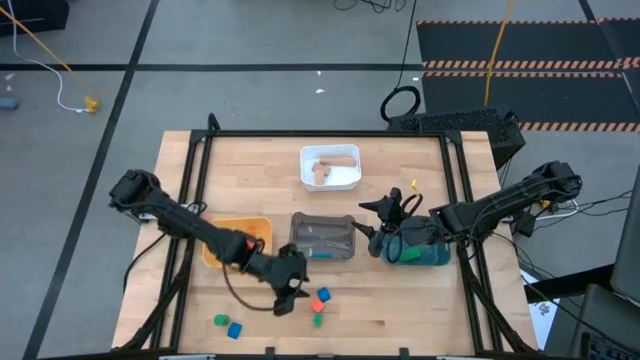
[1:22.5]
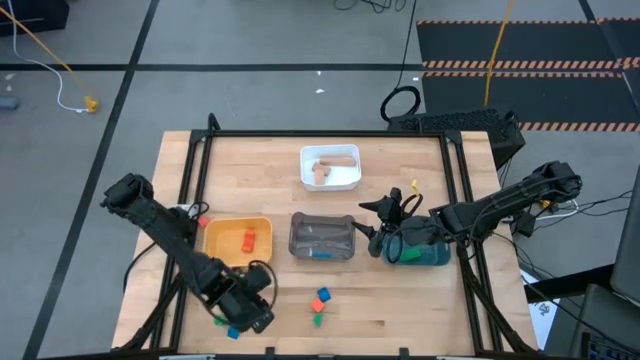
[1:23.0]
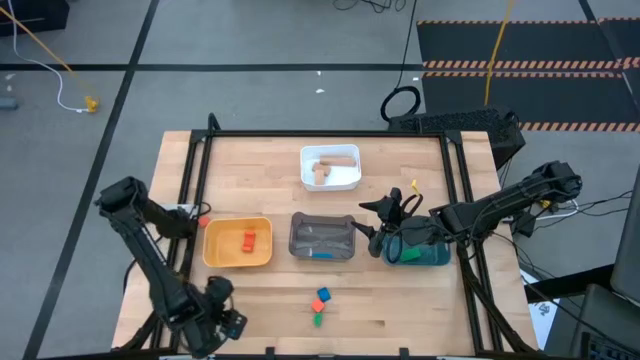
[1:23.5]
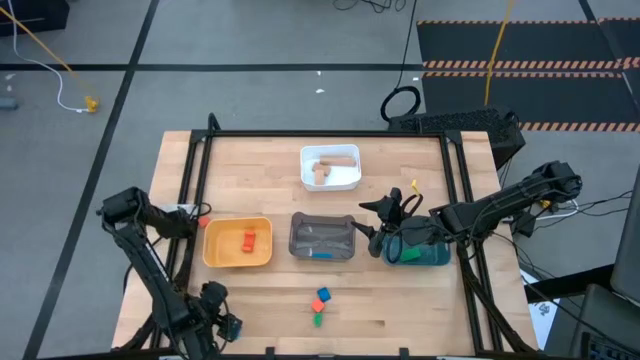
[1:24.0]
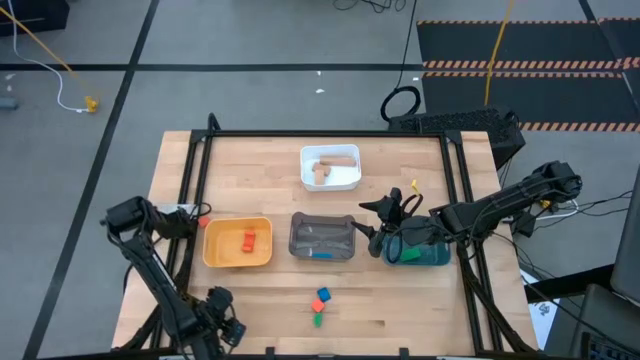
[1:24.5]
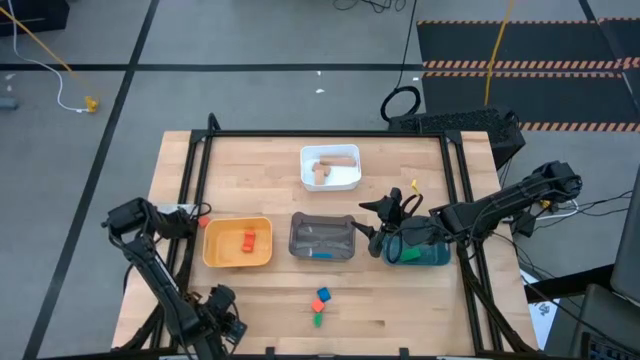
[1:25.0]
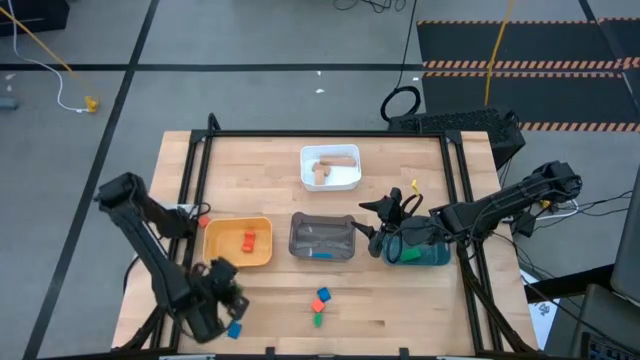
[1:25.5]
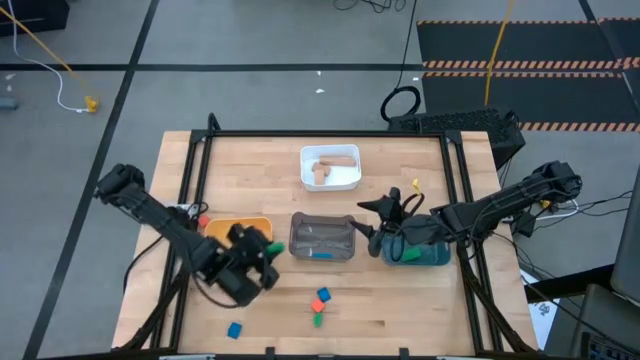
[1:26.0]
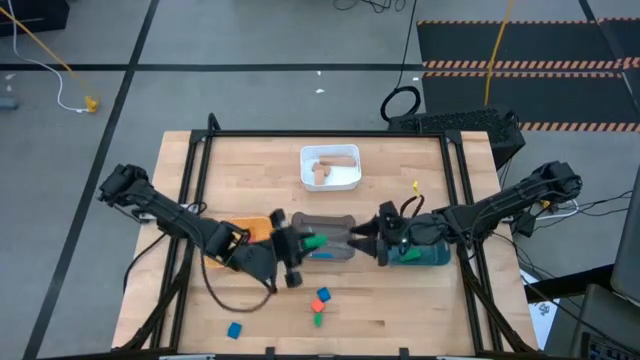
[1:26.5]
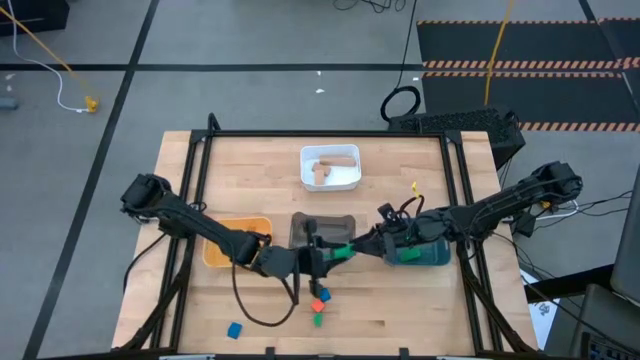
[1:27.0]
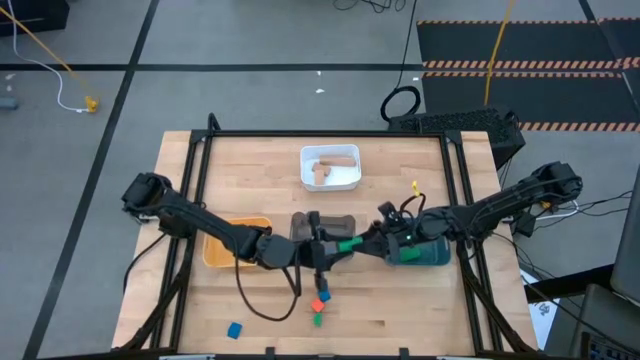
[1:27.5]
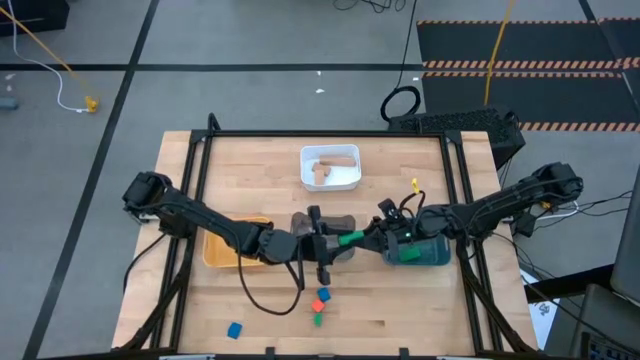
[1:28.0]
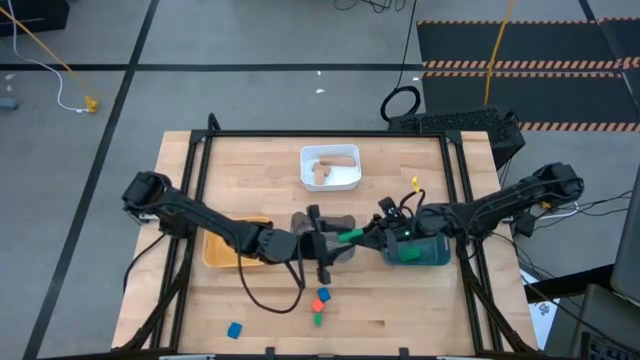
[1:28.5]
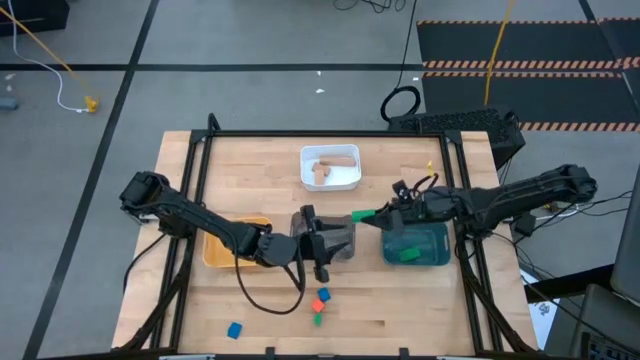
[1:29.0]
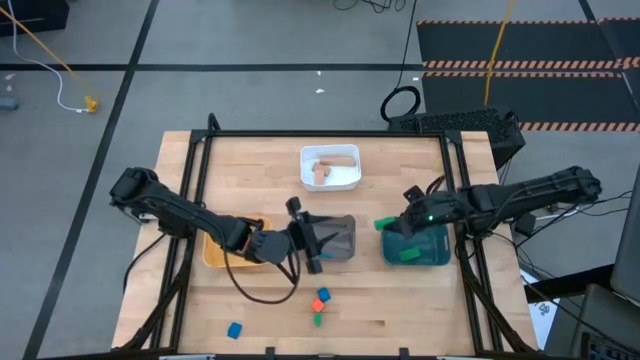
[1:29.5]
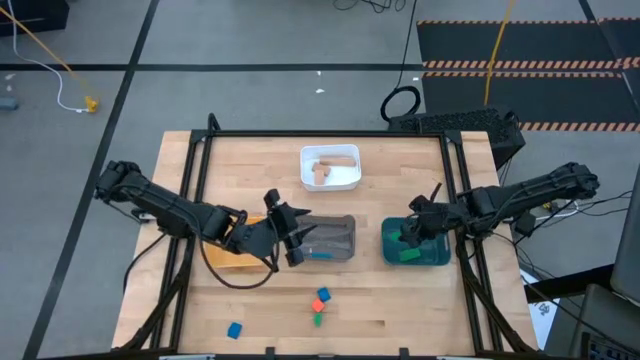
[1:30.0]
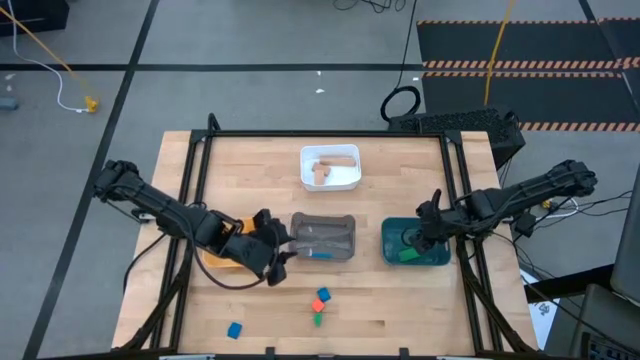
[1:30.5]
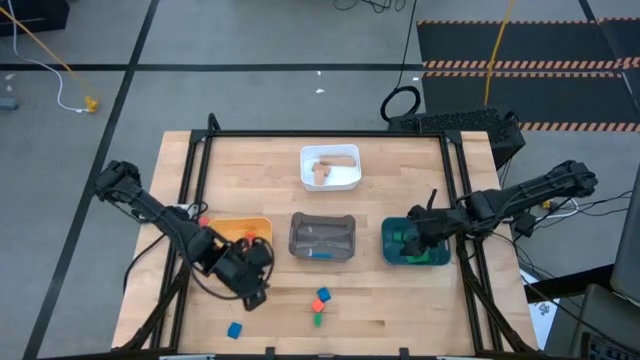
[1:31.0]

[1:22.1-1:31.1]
Task: Sort & place blocks by color
Put the left green cylindrical block into the dark blue bin

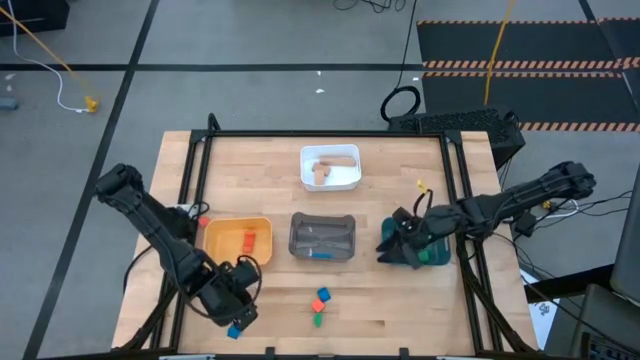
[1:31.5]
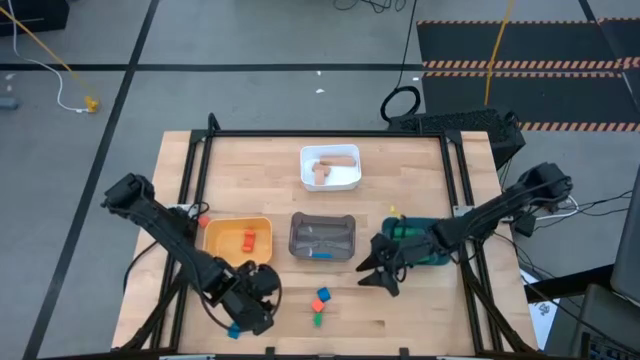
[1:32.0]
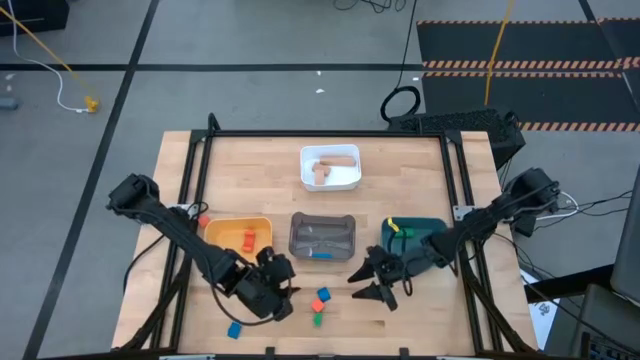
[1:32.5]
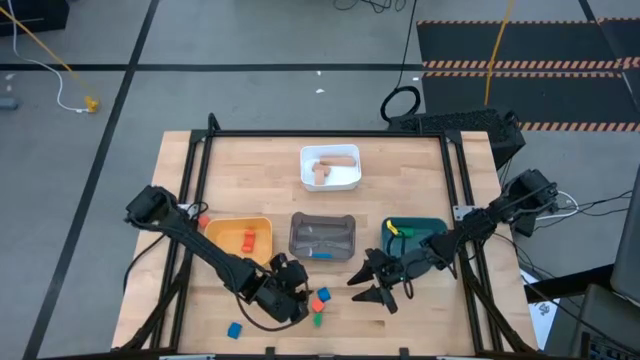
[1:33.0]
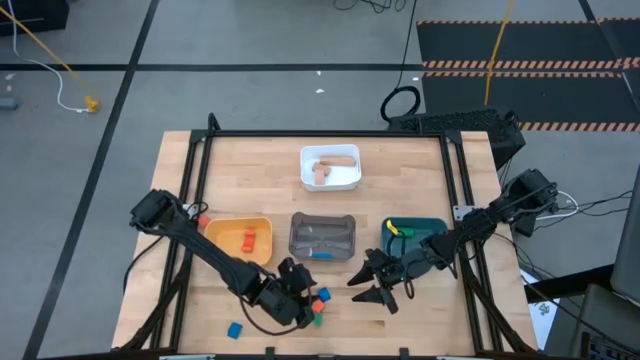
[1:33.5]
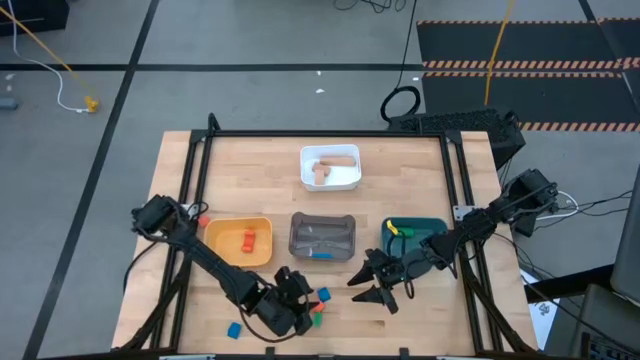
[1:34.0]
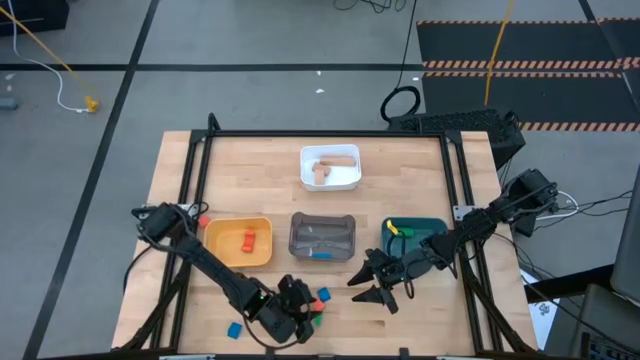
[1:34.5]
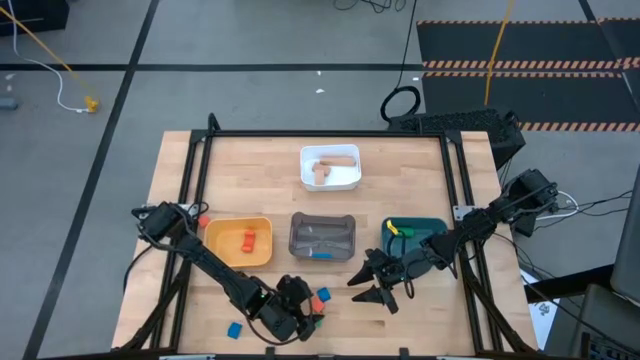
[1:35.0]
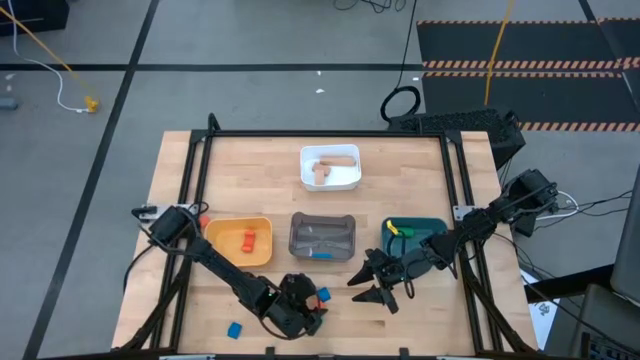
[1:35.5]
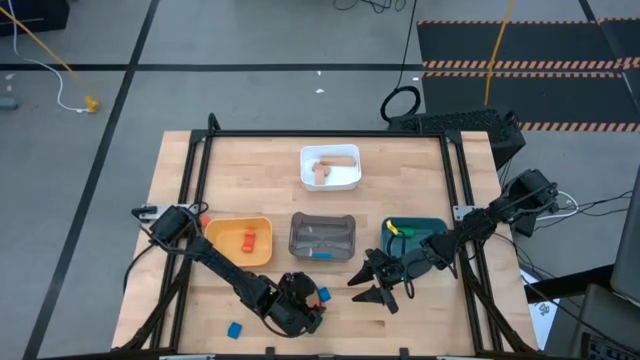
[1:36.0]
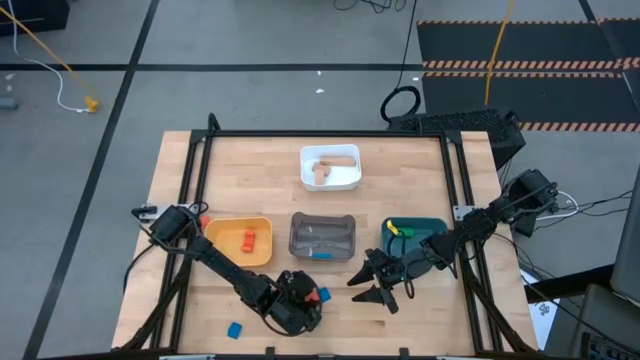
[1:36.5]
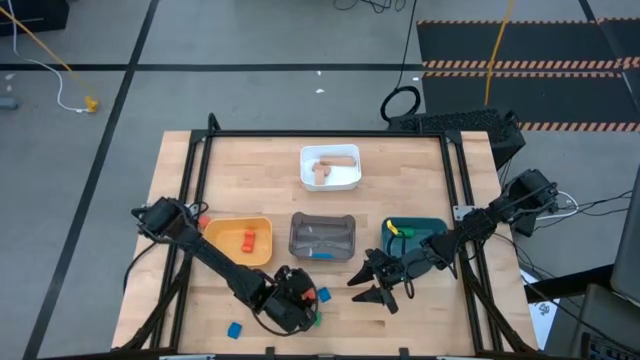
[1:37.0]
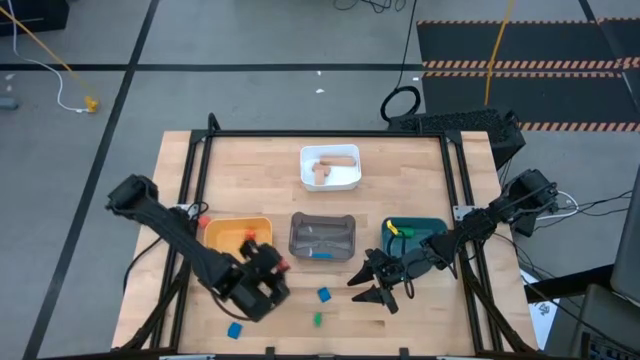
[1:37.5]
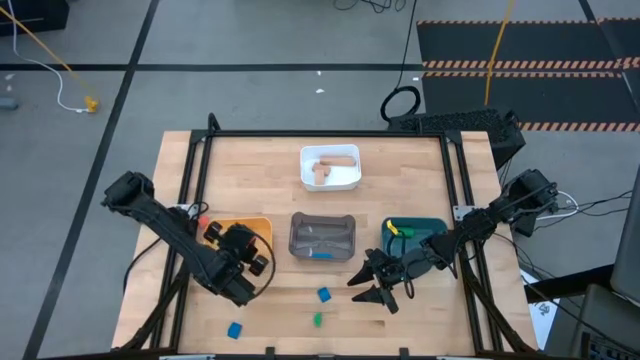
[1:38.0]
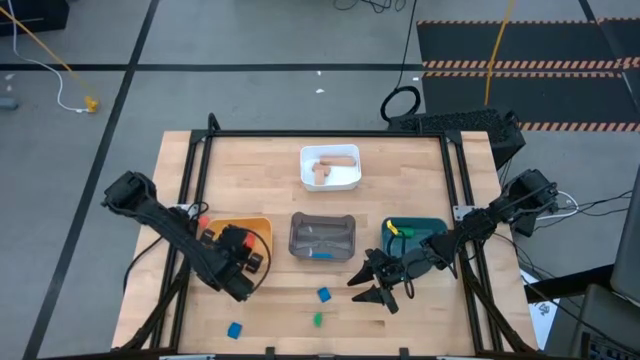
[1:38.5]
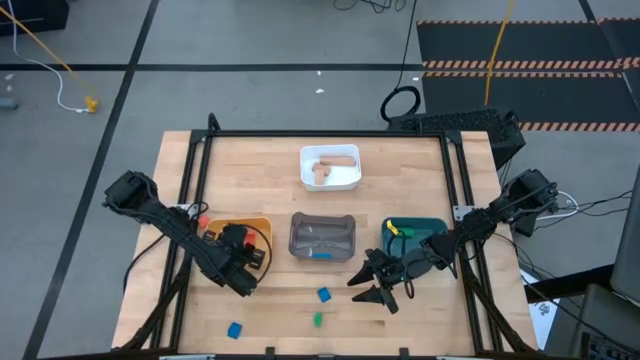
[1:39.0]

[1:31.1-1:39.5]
Put the right orange cube block into the yellow bin

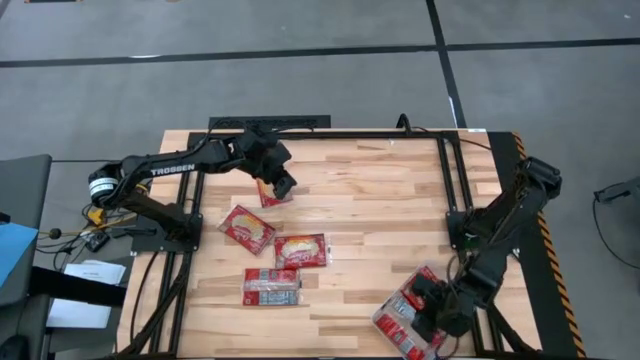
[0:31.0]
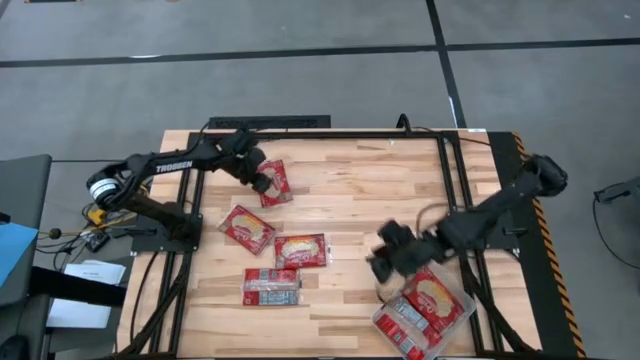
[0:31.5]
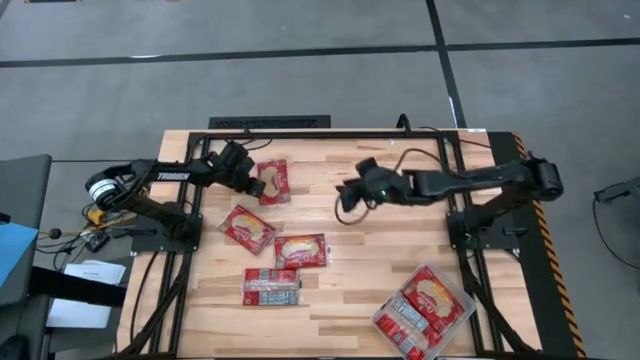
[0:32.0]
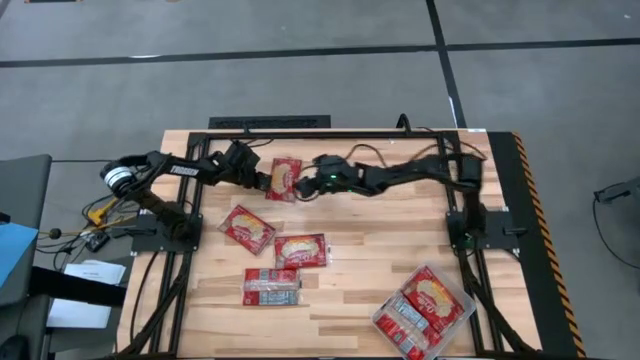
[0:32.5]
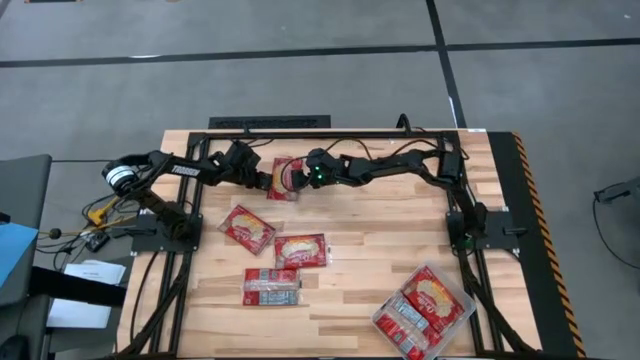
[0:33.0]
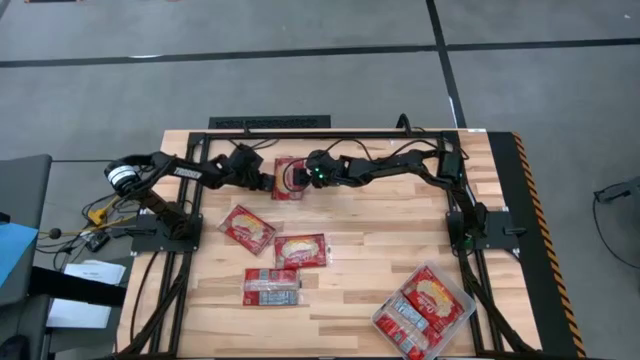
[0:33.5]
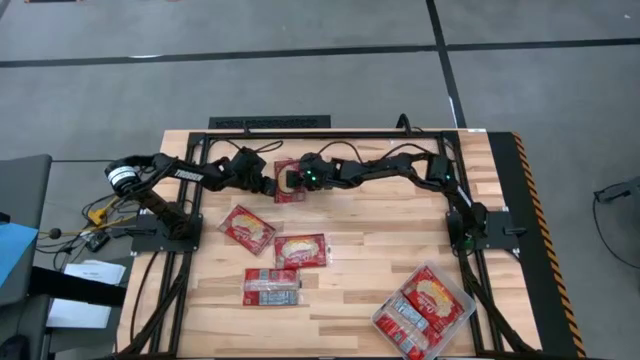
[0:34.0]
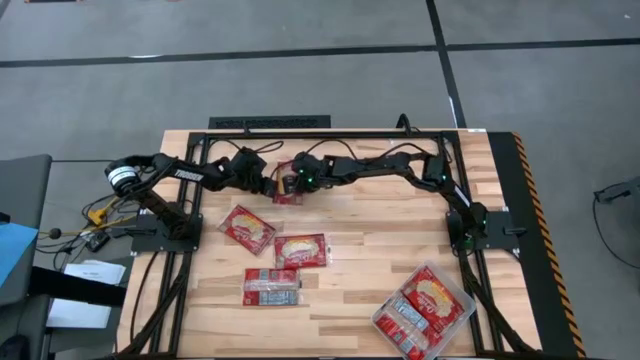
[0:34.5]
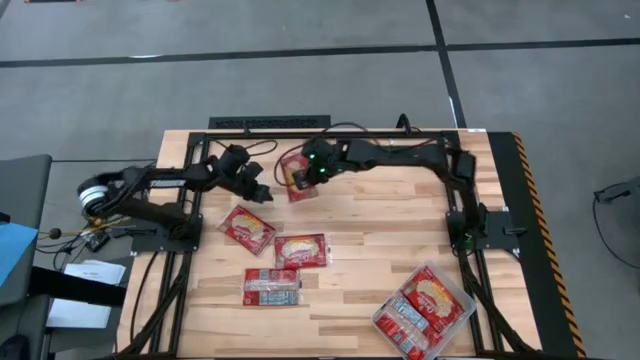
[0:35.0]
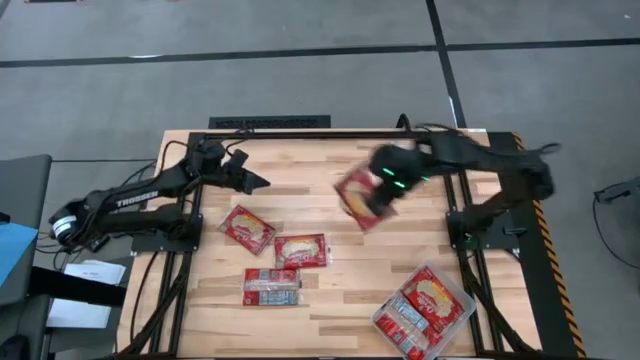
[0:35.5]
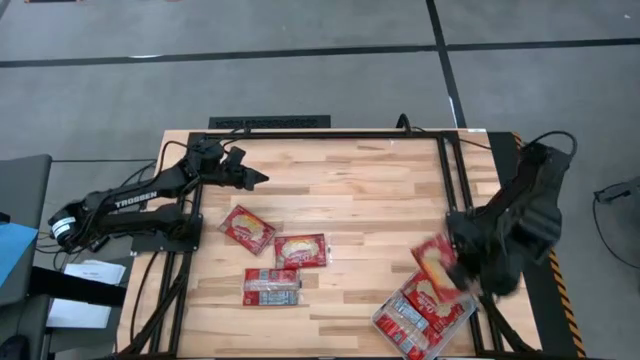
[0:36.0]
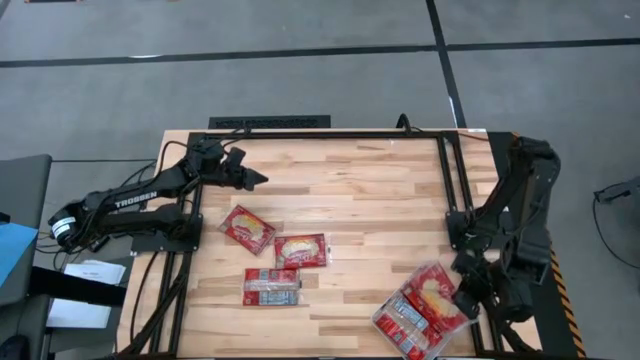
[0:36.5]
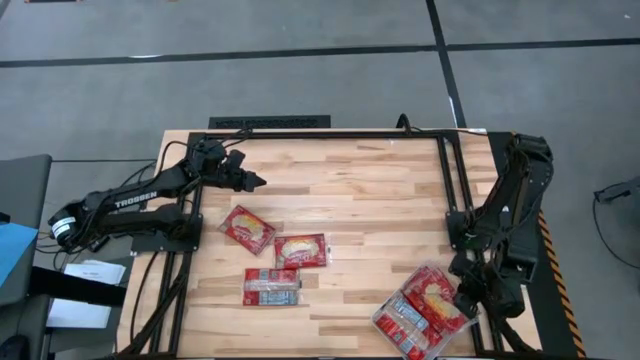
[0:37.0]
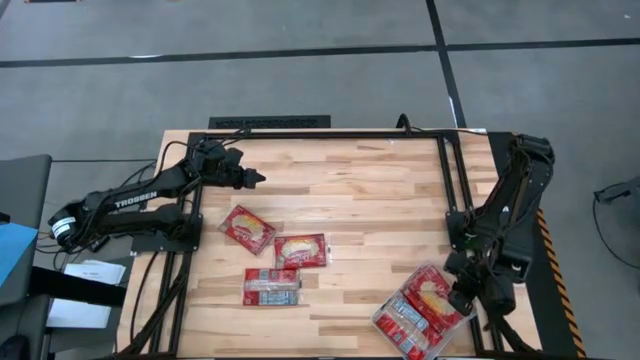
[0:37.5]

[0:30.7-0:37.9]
Task: Sort popcorn bags into baskets
Put the red popcorn bag into the transparent bin
